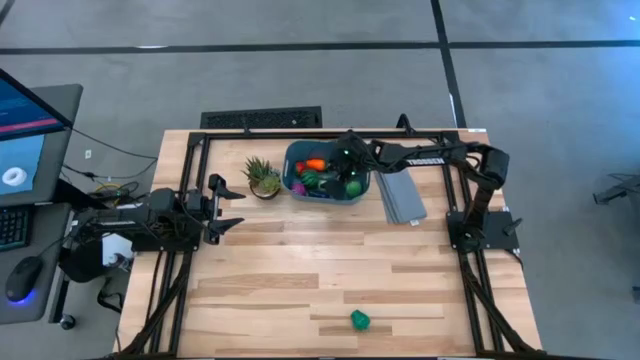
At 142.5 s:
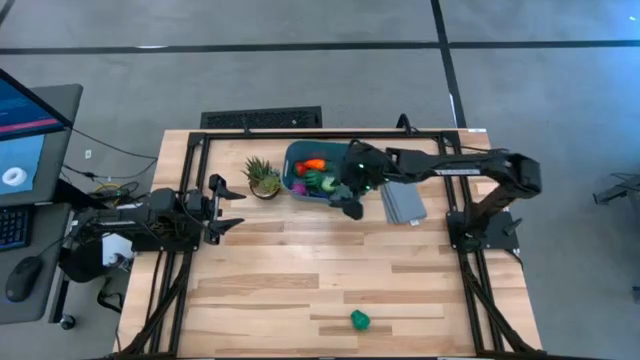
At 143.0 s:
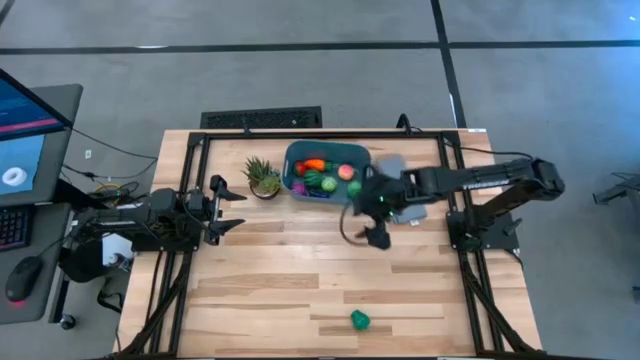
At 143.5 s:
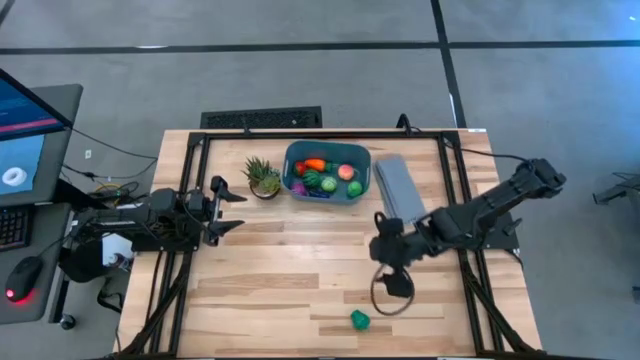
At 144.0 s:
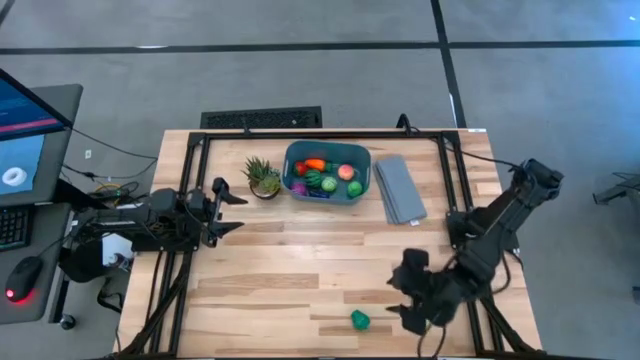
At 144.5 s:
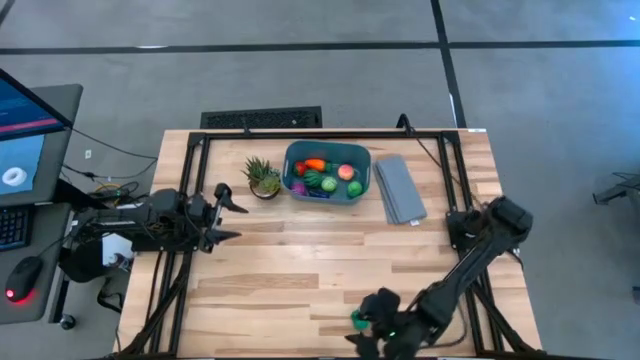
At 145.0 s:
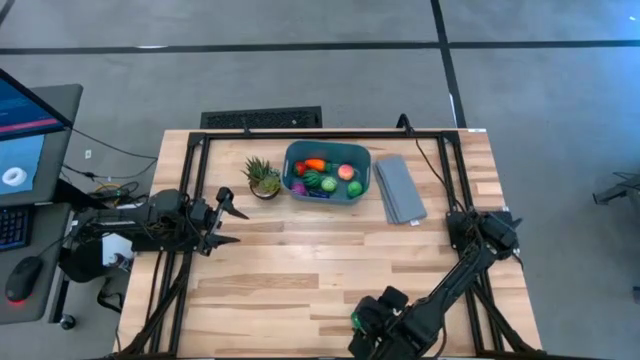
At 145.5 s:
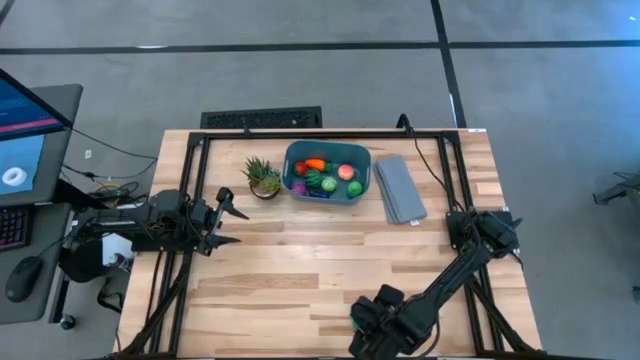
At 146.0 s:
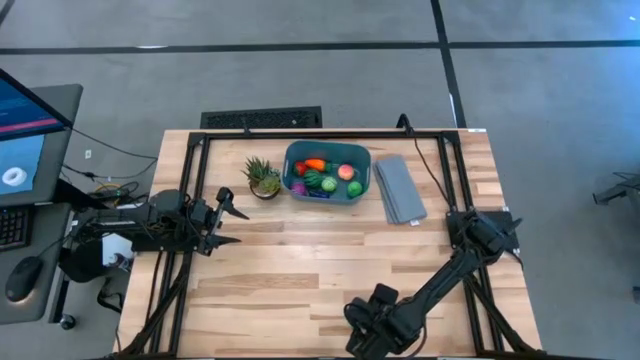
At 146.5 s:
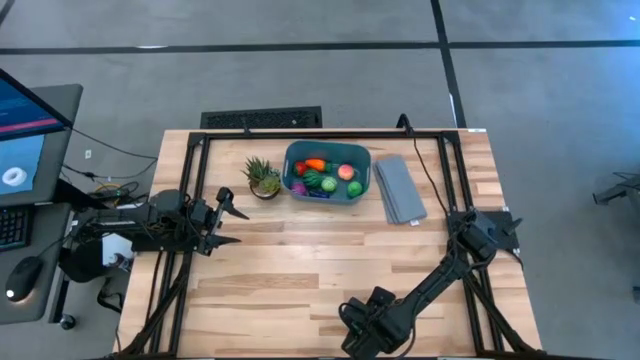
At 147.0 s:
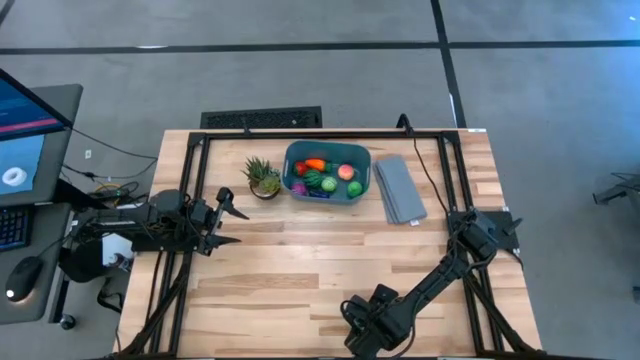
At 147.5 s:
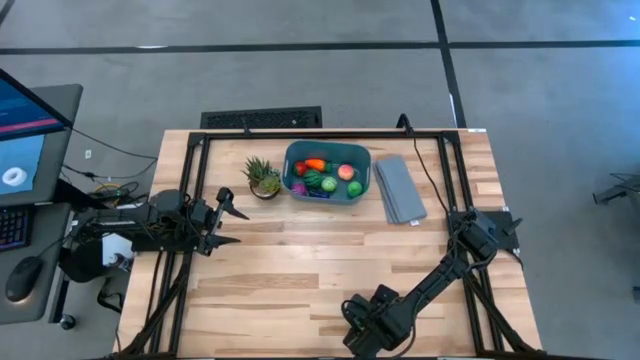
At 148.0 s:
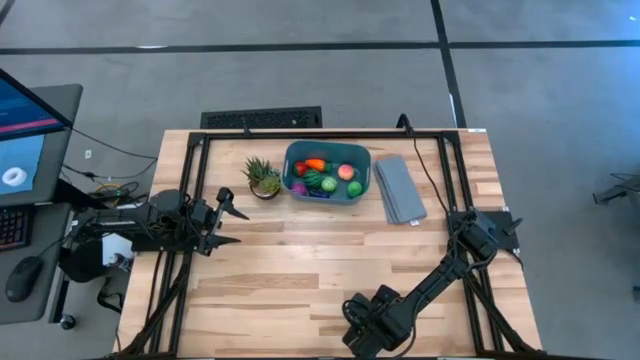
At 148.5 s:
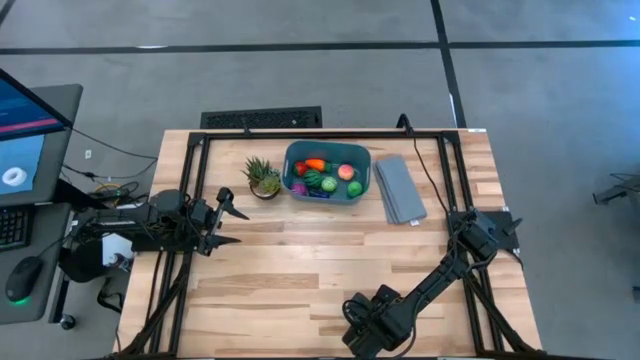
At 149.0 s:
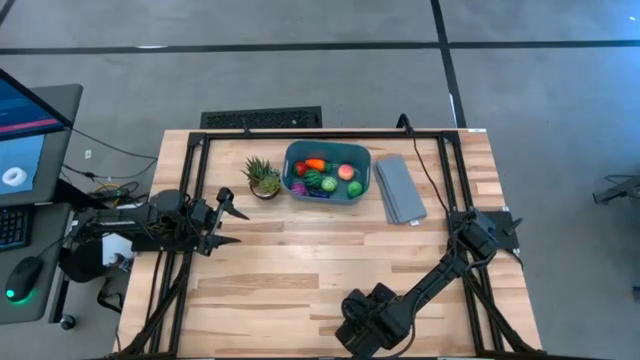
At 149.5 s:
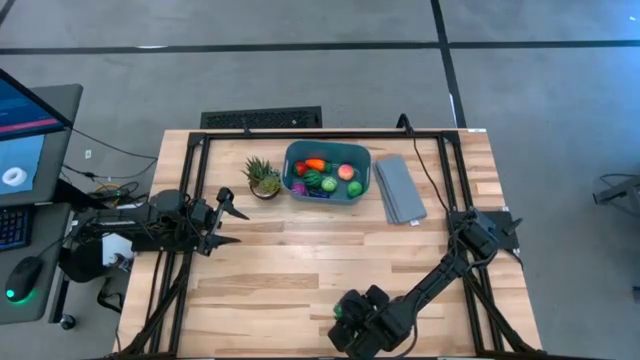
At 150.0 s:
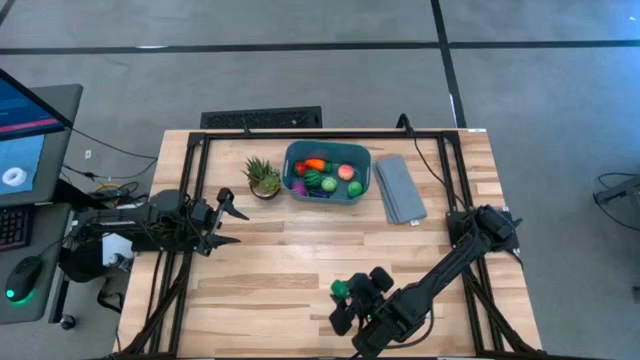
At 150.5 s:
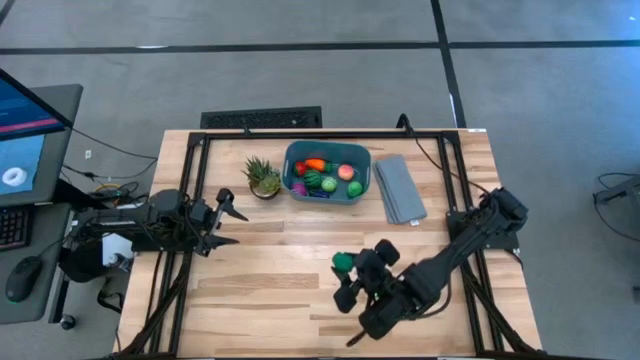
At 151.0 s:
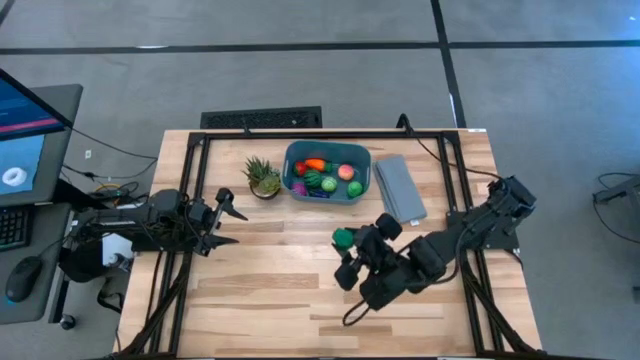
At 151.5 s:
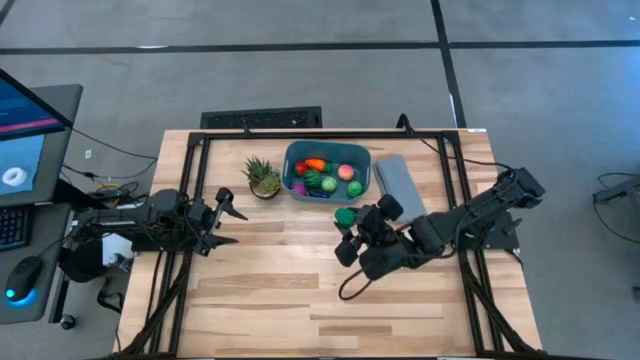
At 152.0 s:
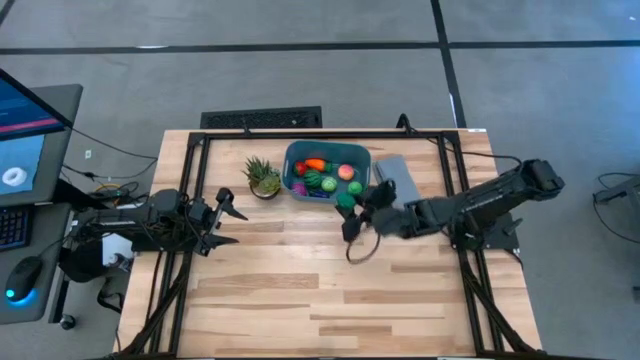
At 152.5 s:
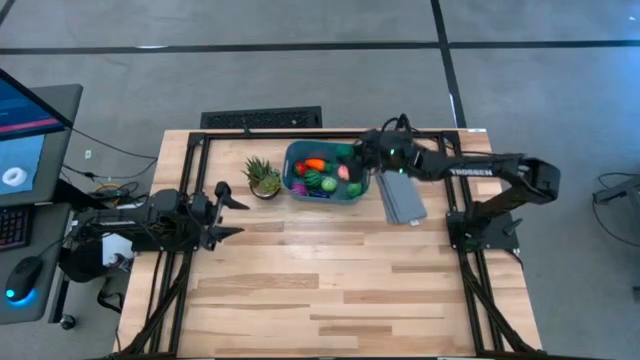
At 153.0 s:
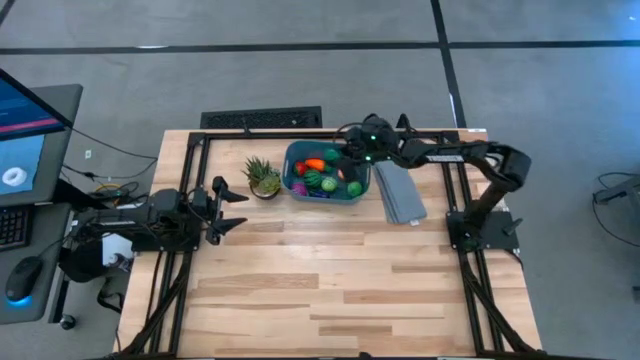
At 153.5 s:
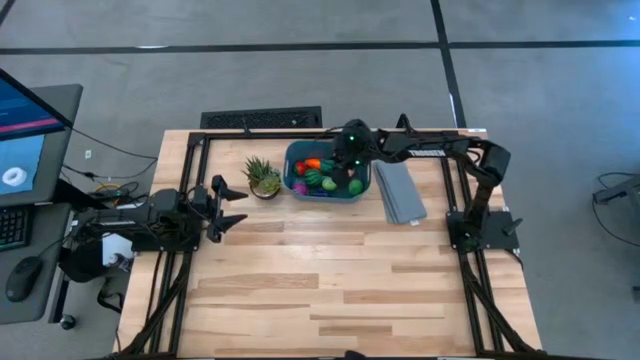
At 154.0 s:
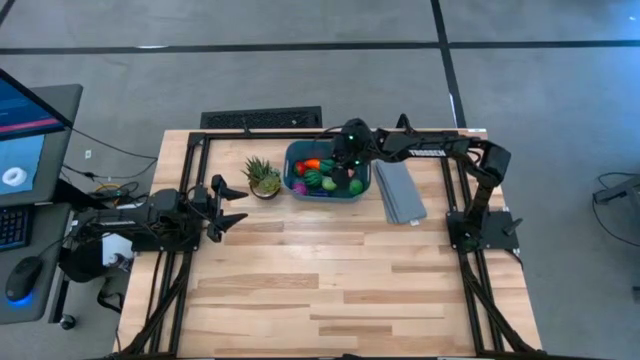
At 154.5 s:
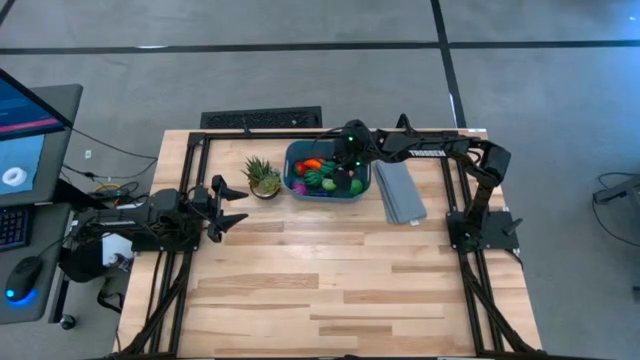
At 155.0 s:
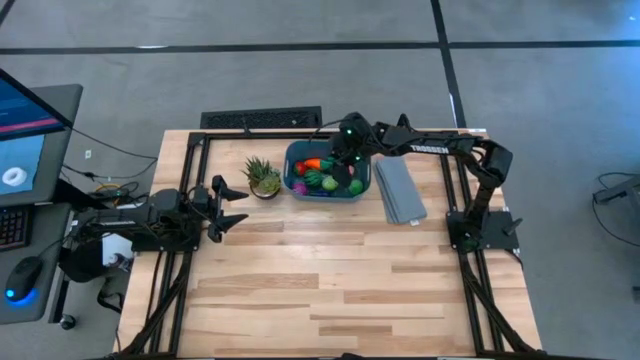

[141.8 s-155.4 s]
Task: Pick and placing Produce into tupperware
Put the bell pepper into the blue bin

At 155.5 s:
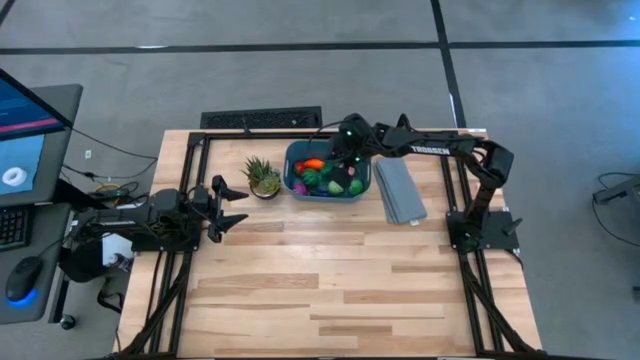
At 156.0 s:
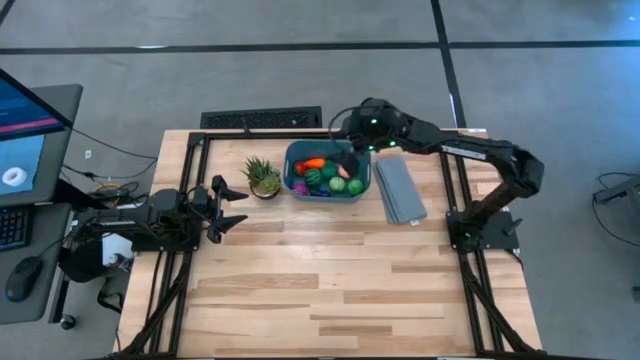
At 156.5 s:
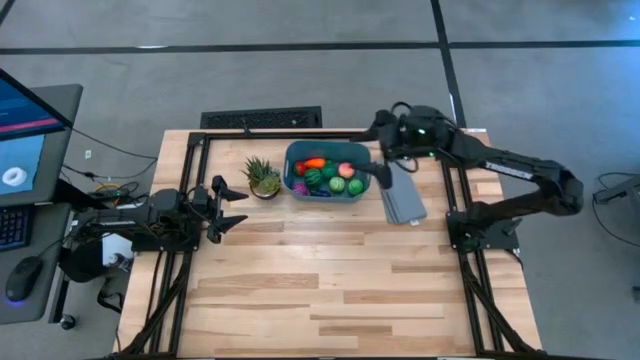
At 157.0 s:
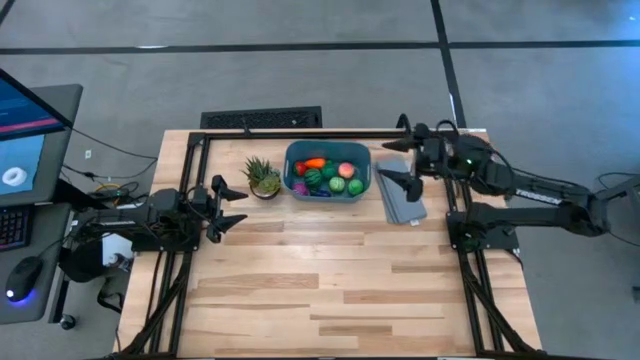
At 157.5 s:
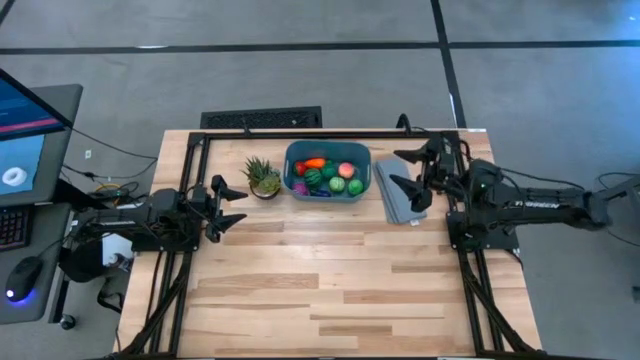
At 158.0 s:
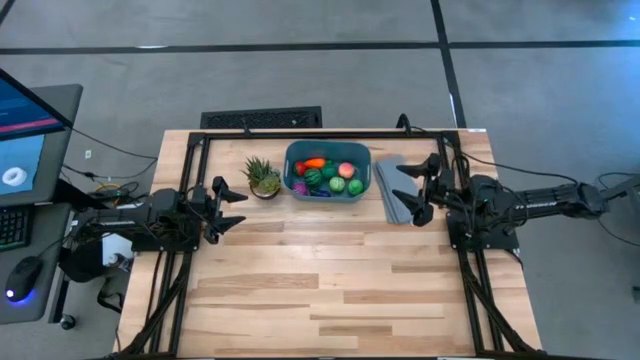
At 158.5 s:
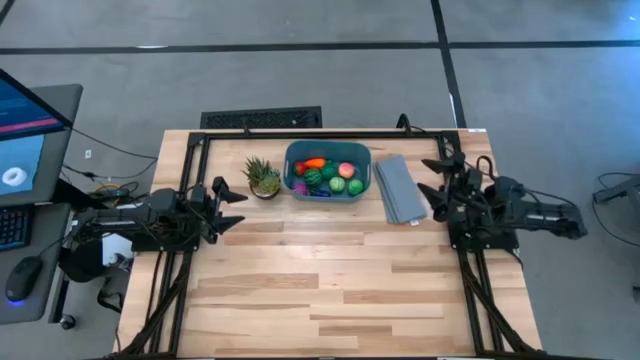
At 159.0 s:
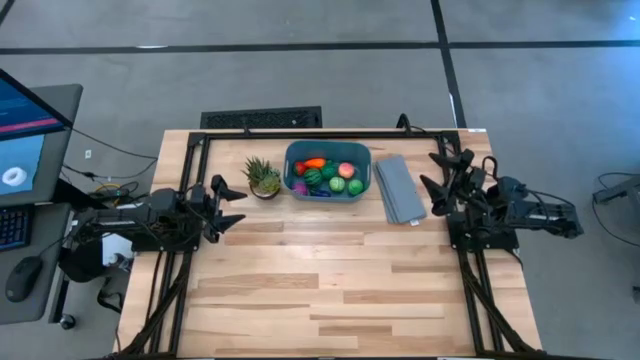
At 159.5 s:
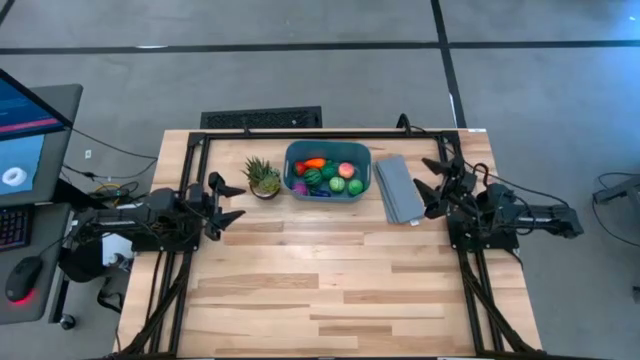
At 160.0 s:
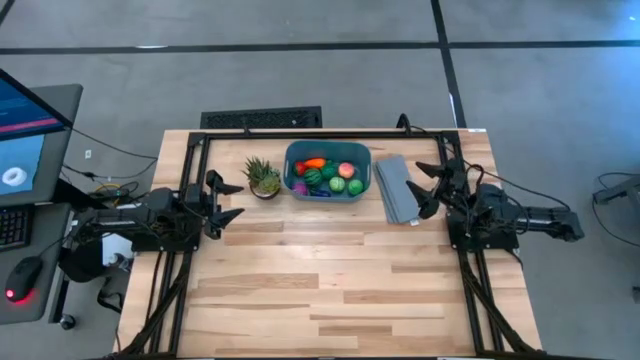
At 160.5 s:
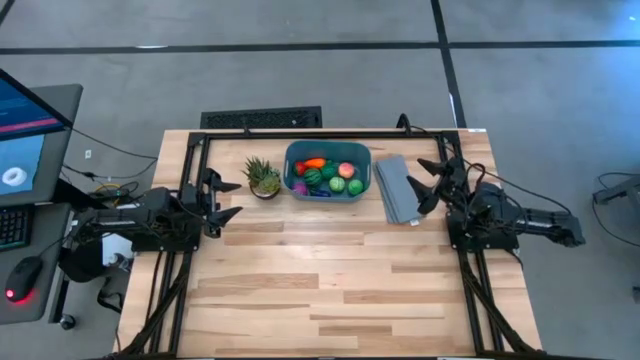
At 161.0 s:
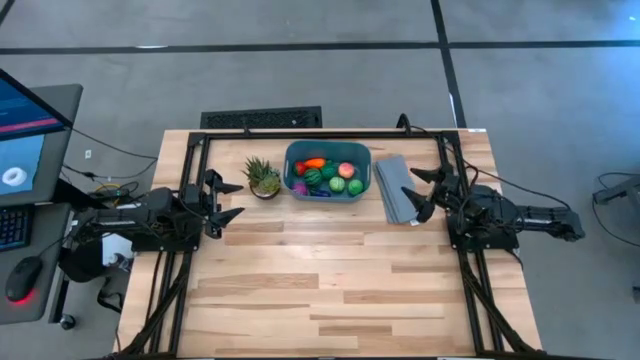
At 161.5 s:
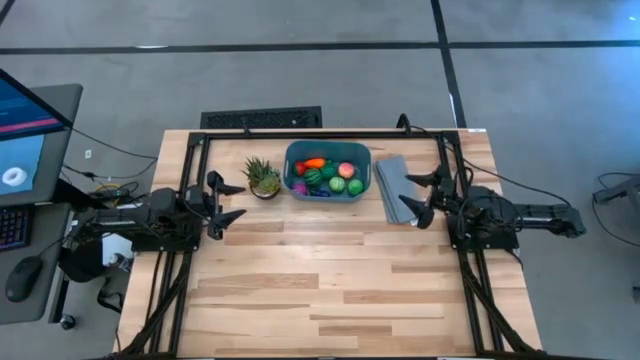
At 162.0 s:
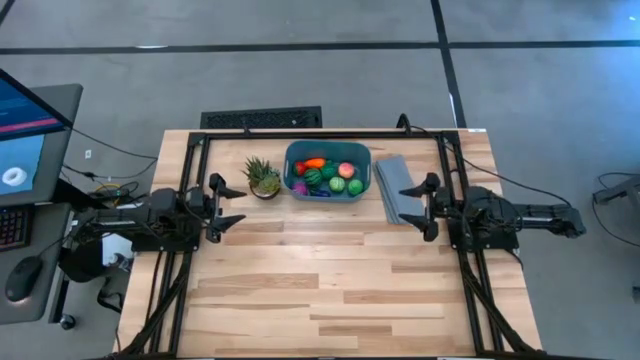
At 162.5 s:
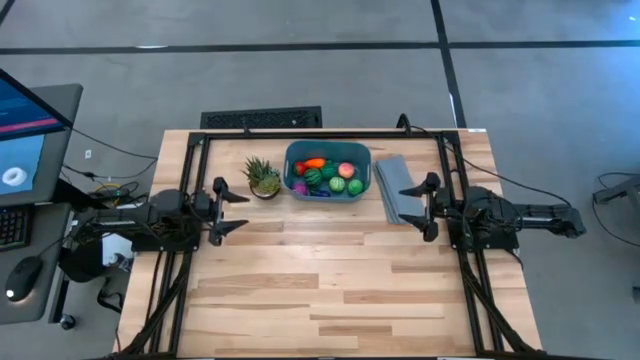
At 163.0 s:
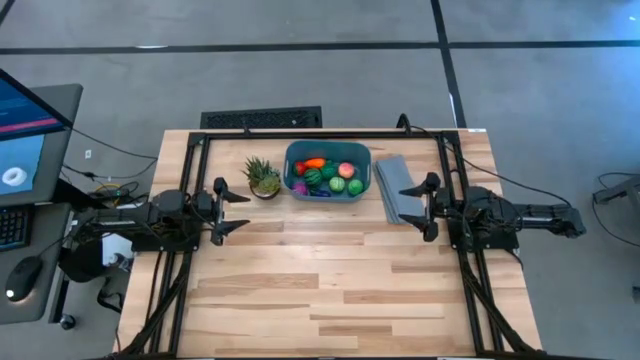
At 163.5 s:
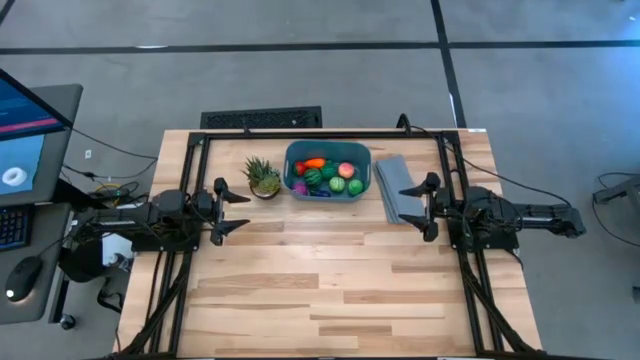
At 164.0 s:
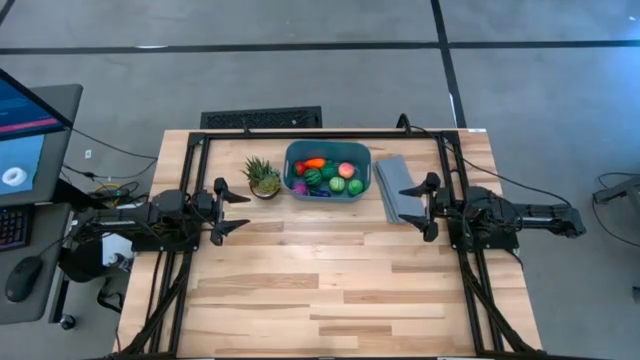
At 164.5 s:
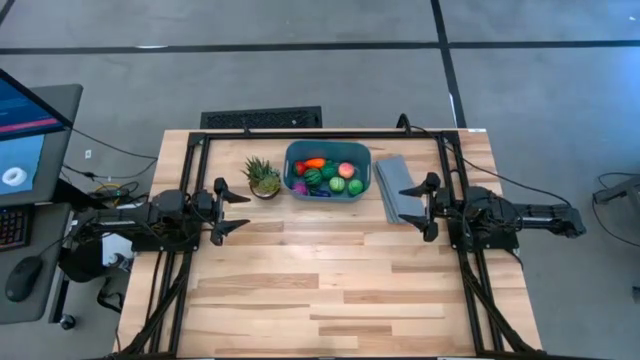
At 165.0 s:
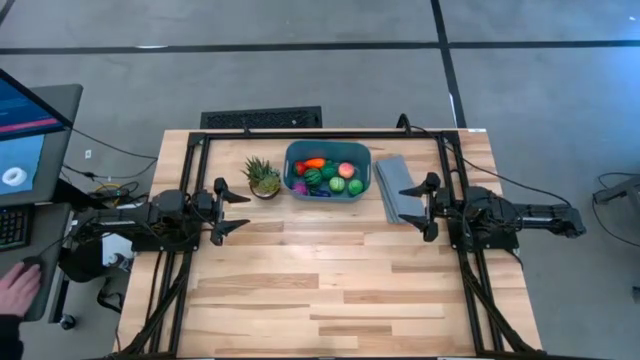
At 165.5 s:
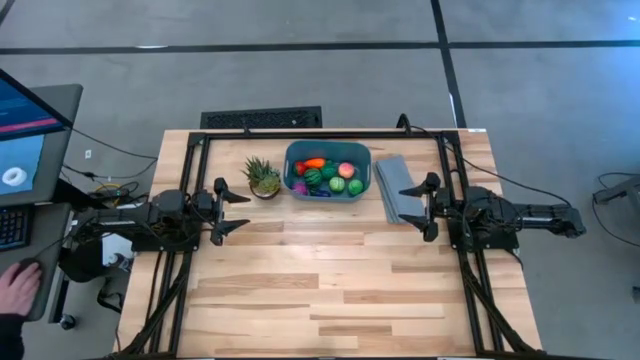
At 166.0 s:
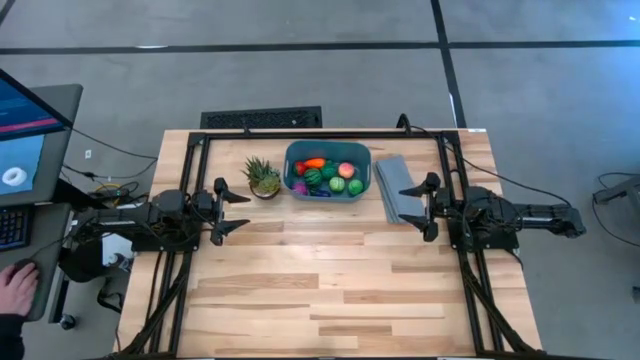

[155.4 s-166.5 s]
Return to Home Position
